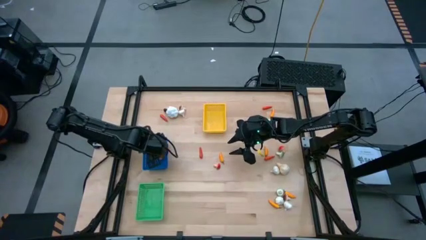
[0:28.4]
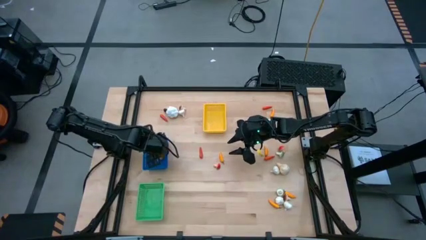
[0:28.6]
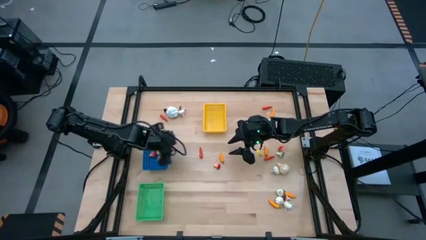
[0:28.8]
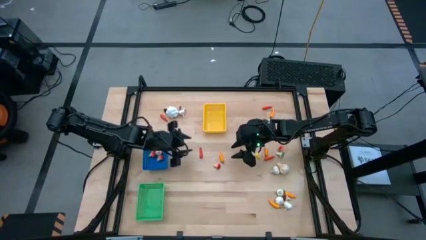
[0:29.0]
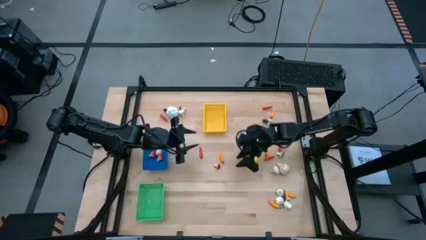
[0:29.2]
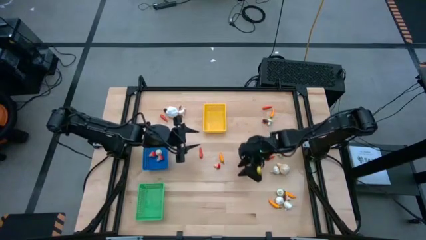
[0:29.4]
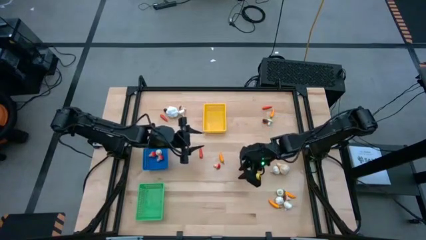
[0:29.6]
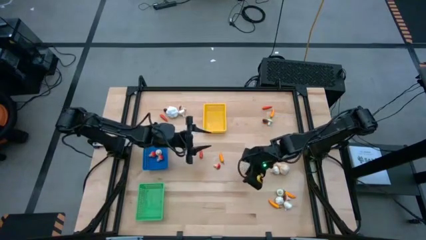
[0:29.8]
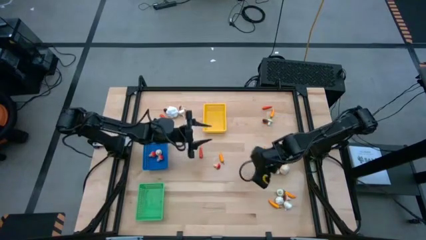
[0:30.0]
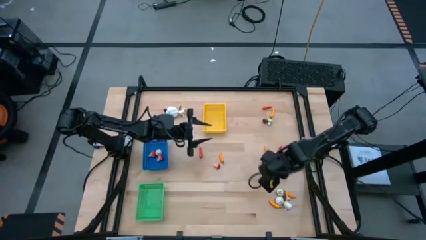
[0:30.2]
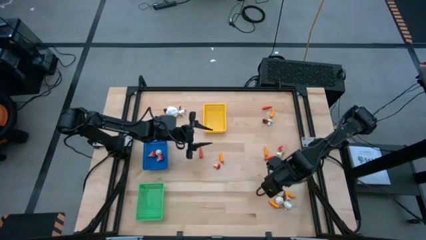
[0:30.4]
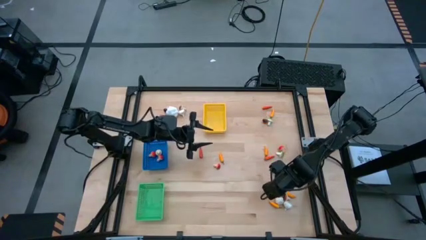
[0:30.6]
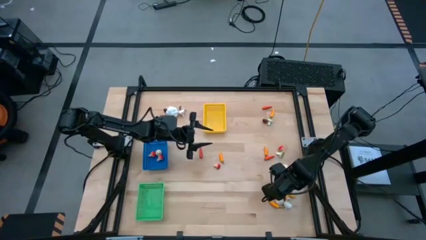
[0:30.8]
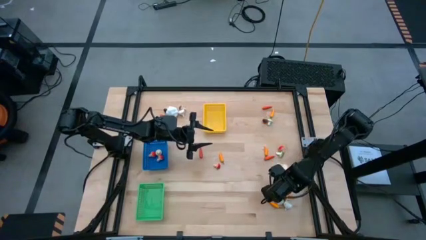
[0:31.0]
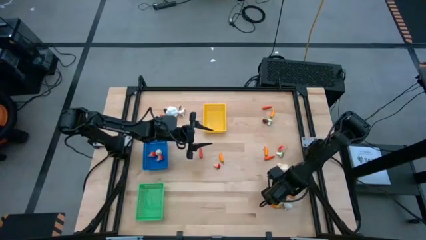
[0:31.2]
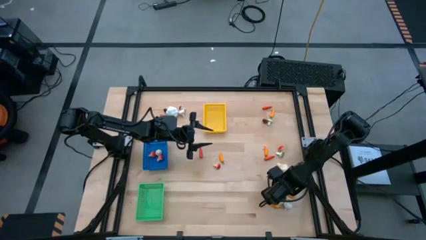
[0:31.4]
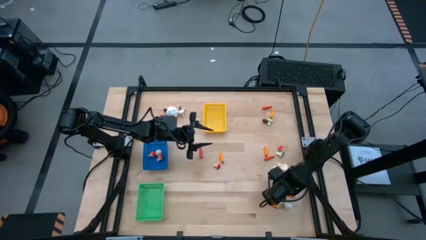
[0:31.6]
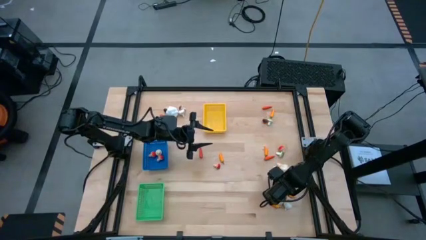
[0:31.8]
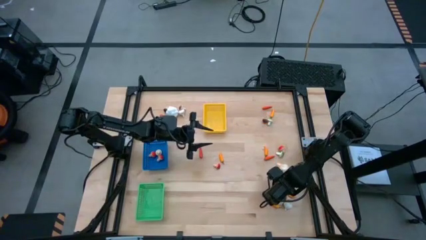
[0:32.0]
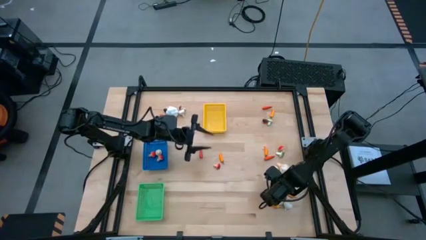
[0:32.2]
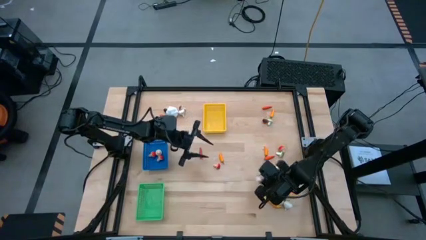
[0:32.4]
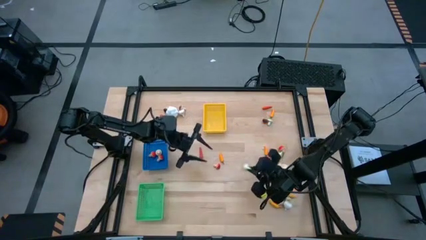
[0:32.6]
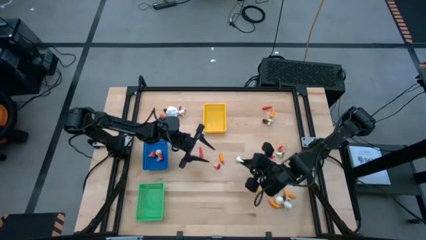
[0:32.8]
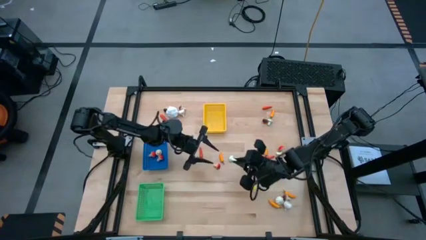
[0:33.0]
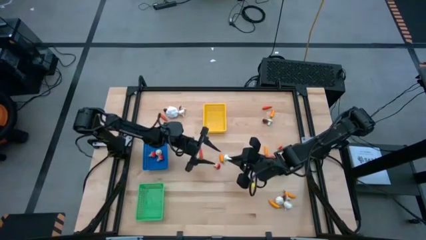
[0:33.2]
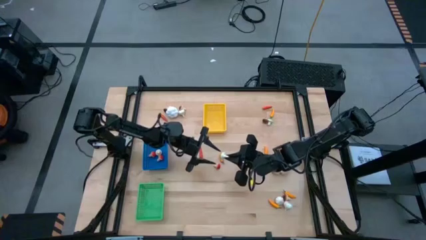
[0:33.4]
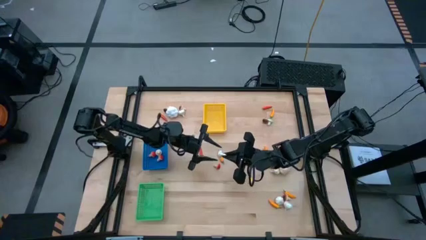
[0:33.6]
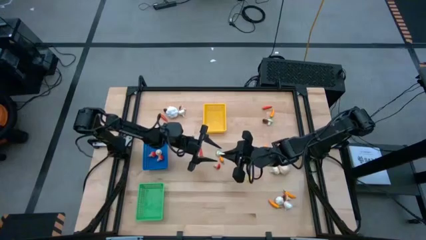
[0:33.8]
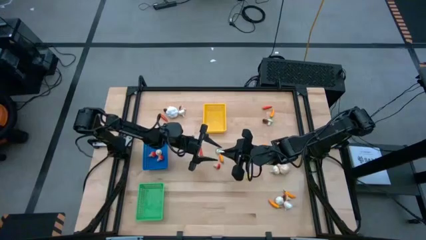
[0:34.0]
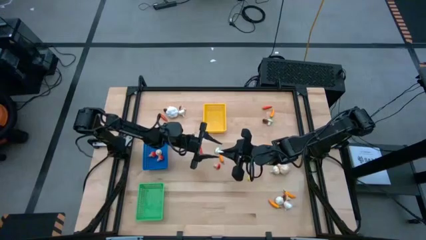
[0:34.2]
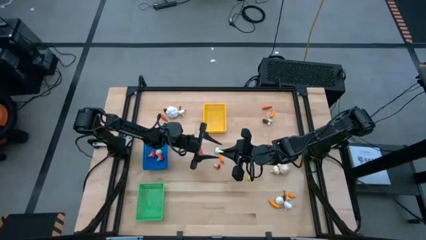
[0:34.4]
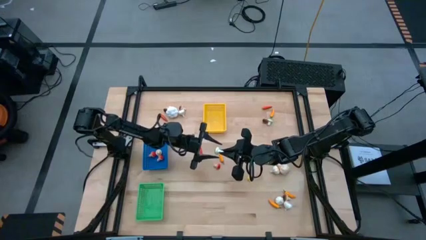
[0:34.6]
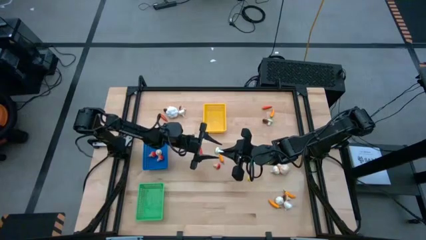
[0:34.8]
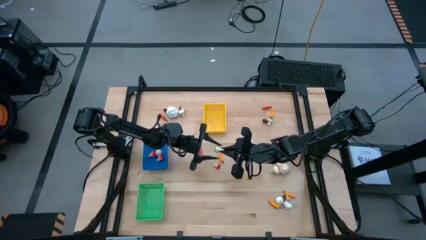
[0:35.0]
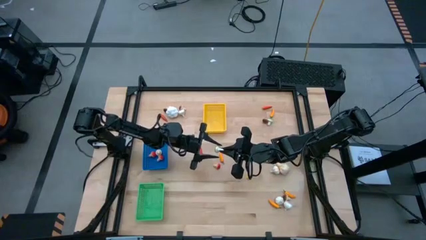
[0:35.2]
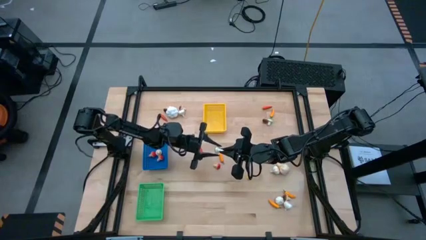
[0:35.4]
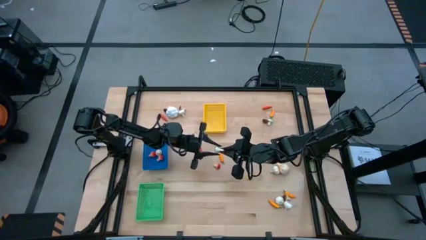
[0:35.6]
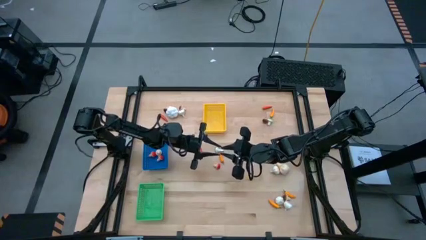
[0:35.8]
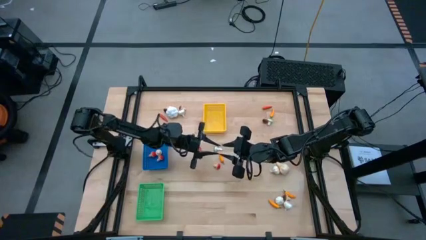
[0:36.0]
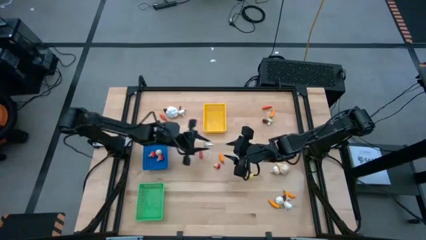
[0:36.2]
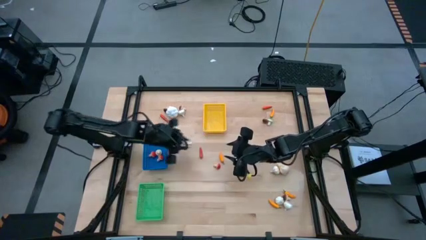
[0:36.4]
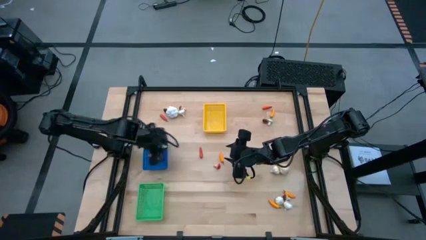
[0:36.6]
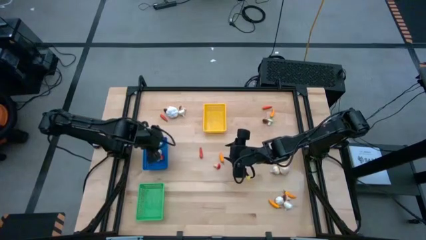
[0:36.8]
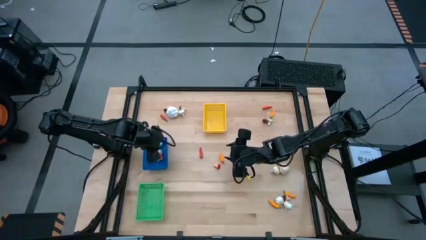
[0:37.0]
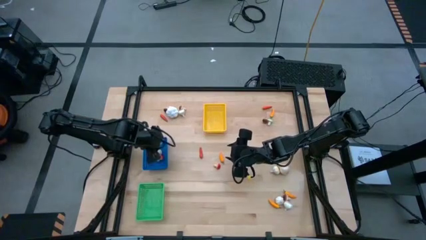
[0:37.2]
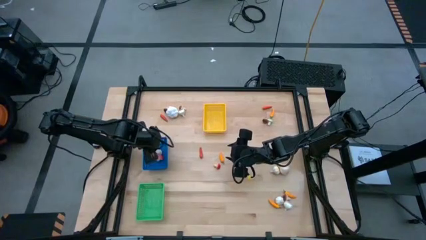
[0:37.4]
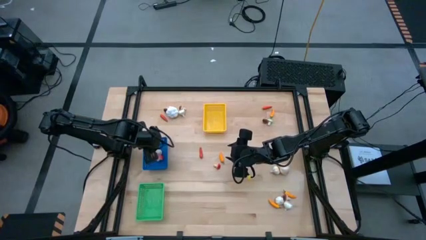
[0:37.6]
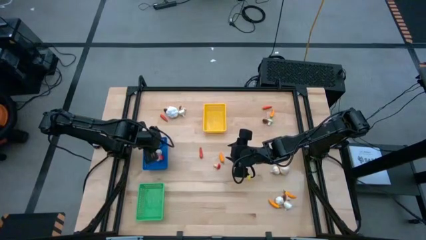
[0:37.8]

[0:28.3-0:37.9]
Task: Sort produce into baskets
Put the green mushroom into the blue bin

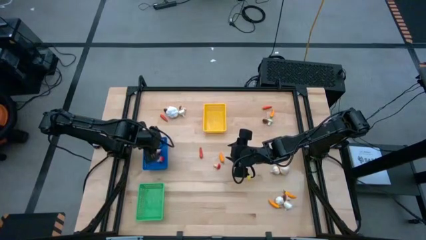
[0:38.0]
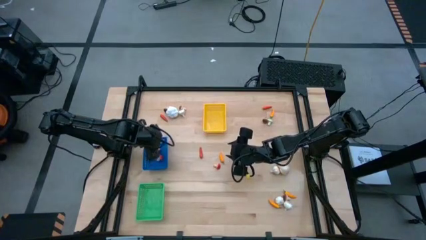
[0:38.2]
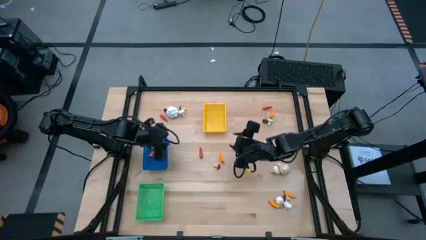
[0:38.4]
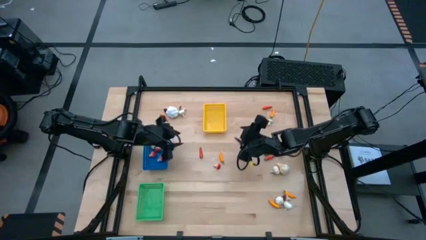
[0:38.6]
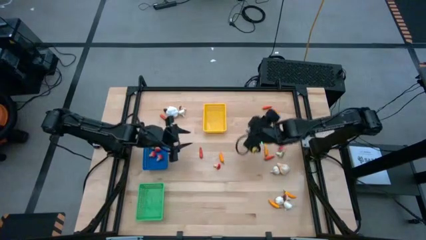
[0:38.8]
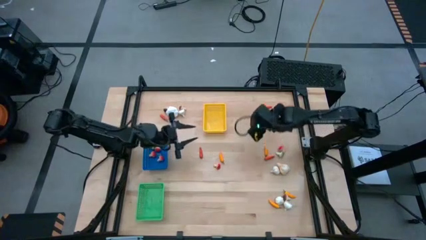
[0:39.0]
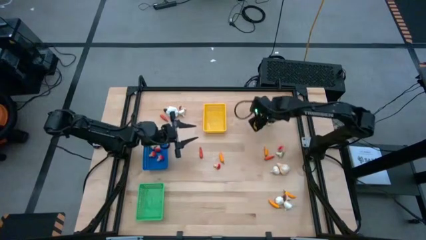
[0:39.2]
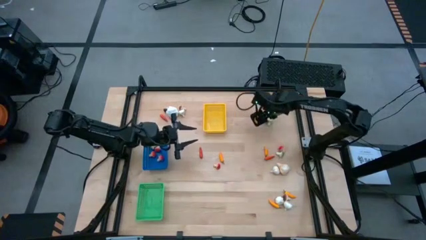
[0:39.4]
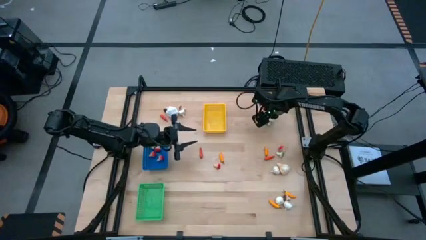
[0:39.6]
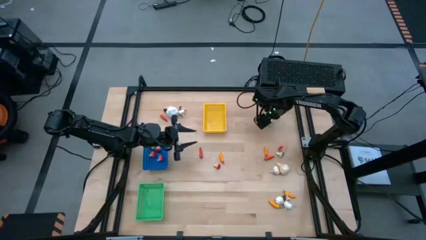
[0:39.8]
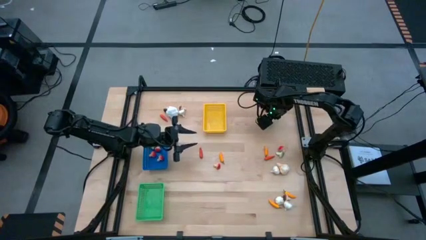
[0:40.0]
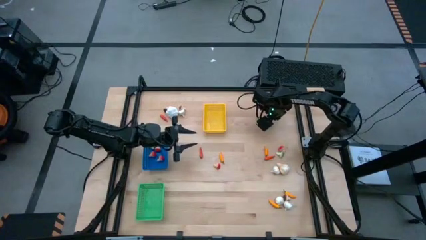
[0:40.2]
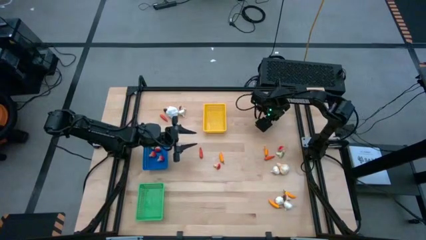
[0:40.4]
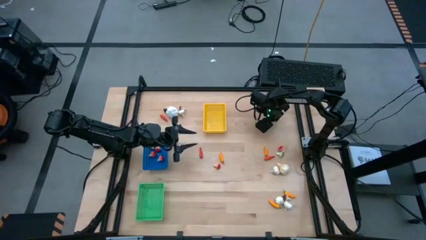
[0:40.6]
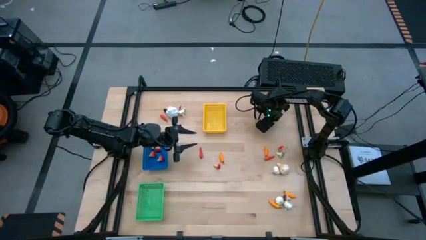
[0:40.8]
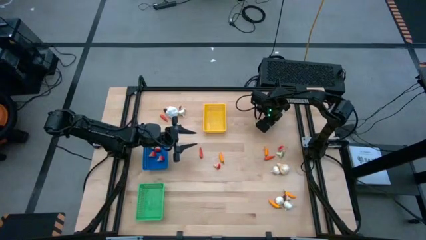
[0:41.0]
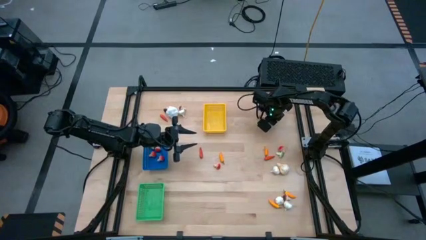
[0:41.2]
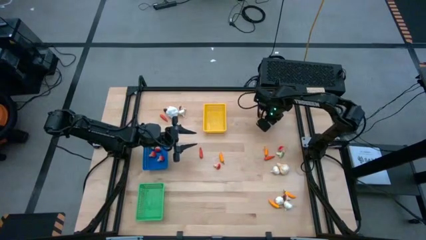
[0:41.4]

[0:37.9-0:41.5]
Put the green mushroom into the blue bin

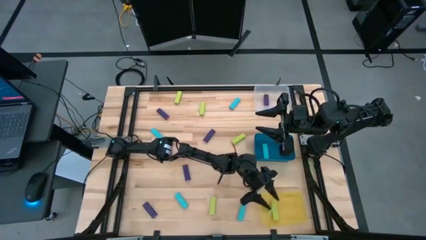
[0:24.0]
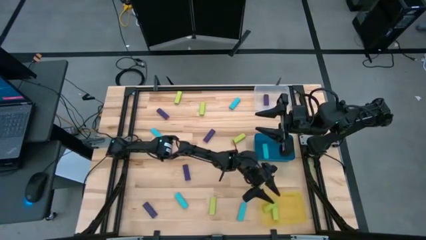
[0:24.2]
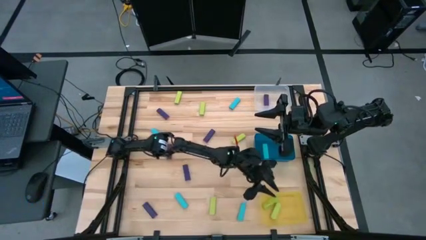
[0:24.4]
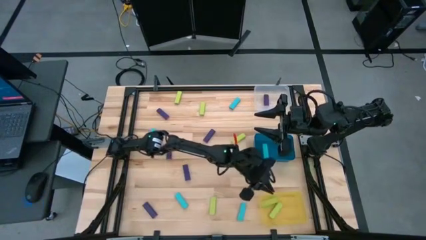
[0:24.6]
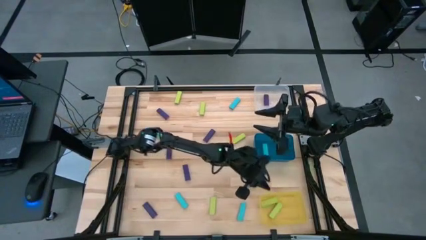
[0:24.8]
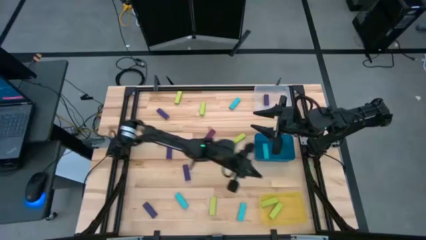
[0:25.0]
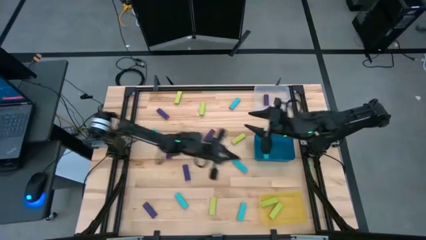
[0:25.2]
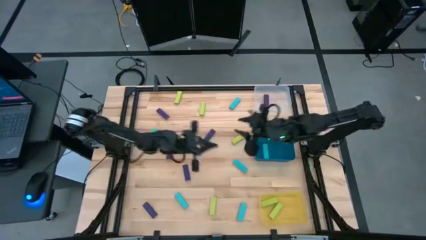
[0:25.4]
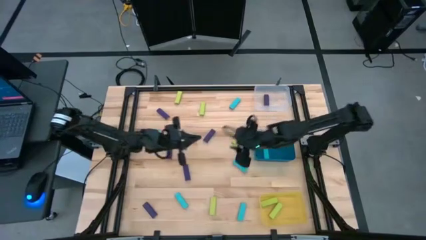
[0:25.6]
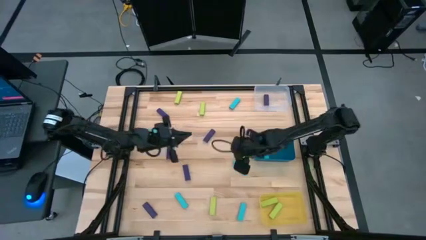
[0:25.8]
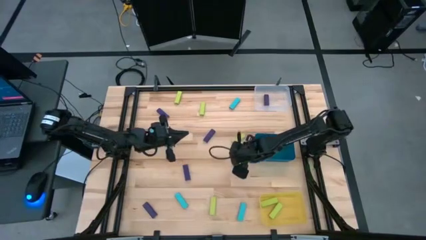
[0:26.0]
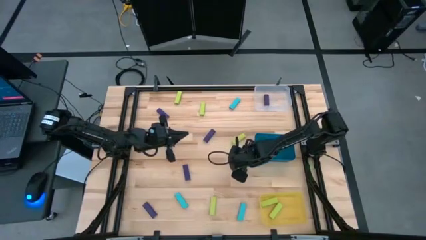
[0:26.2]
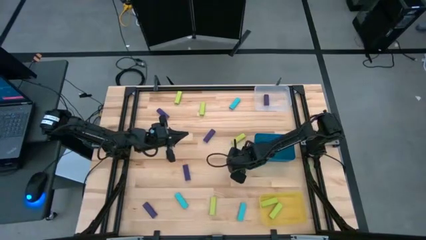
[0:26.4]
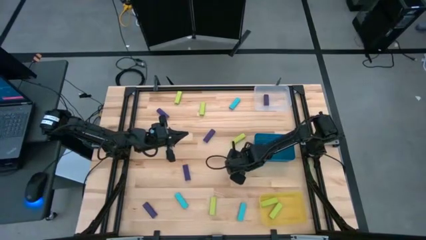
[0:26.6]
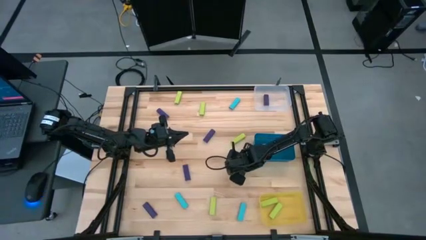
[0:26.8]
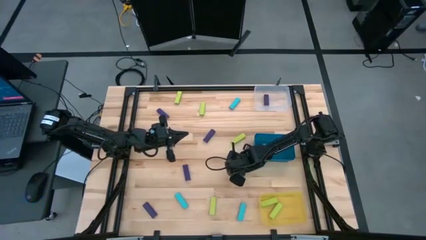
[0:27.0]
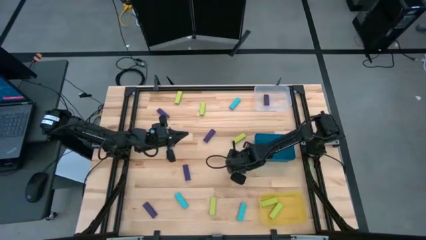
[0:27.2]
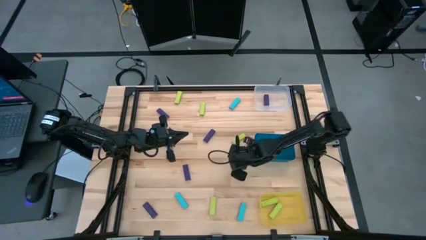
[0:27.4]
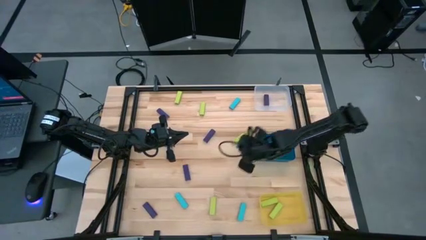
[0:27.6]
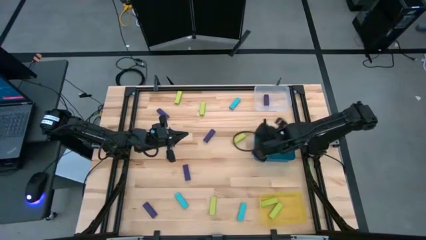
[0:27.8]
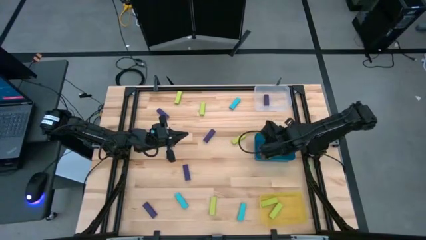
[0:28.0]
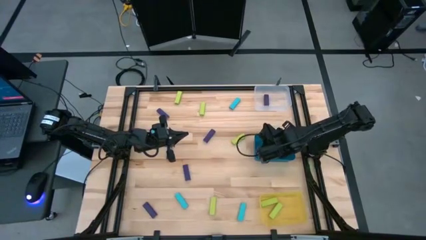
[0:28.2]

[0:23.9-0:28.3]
Task: Sort blocks
Put the light blue block into the blue bin
